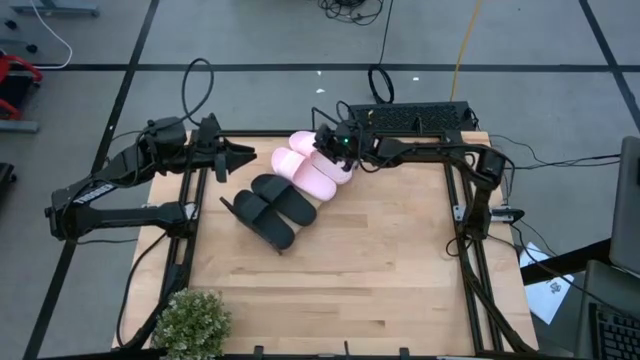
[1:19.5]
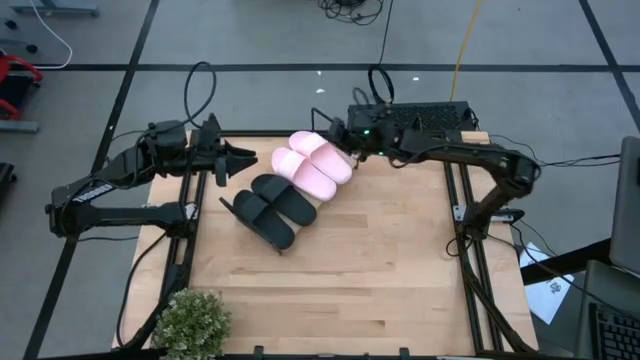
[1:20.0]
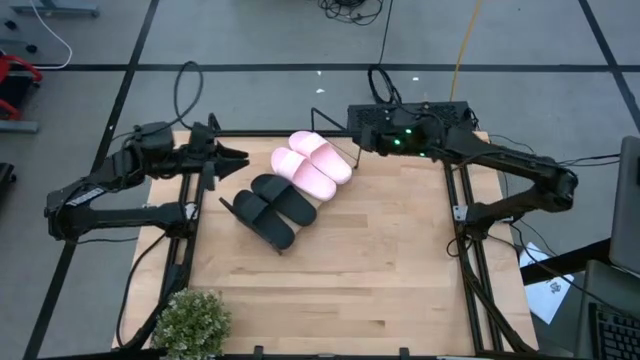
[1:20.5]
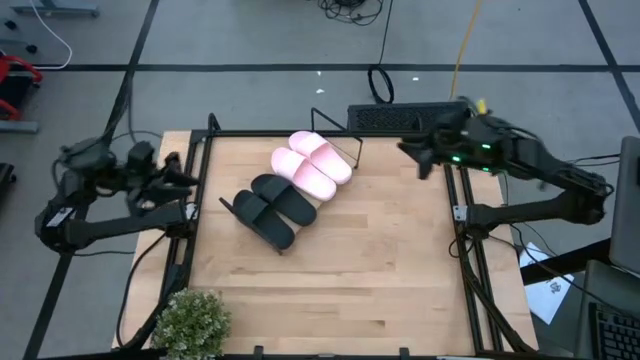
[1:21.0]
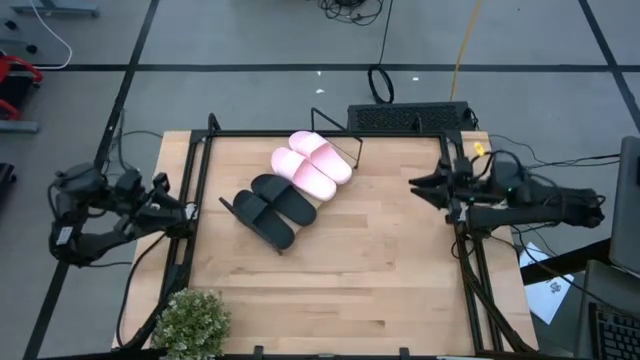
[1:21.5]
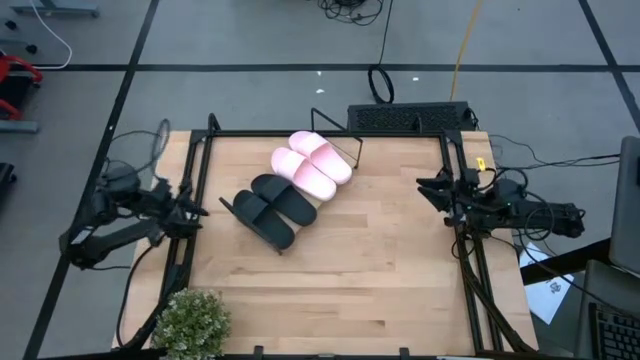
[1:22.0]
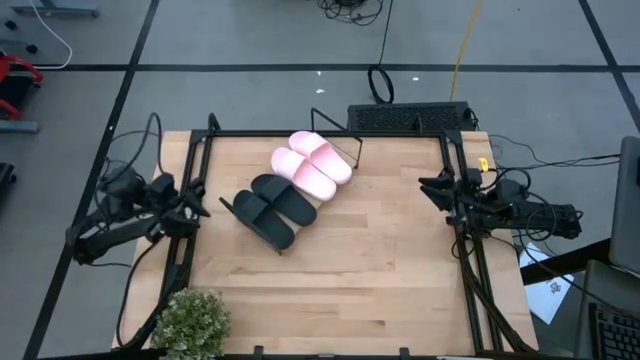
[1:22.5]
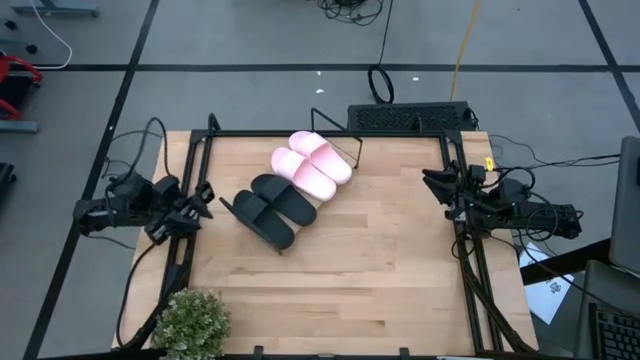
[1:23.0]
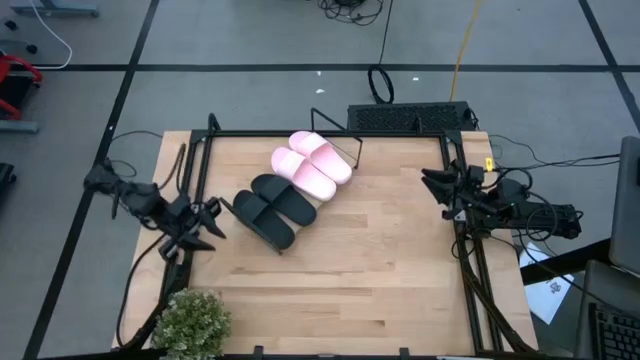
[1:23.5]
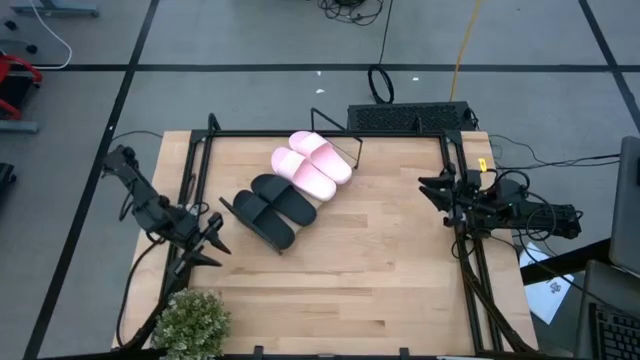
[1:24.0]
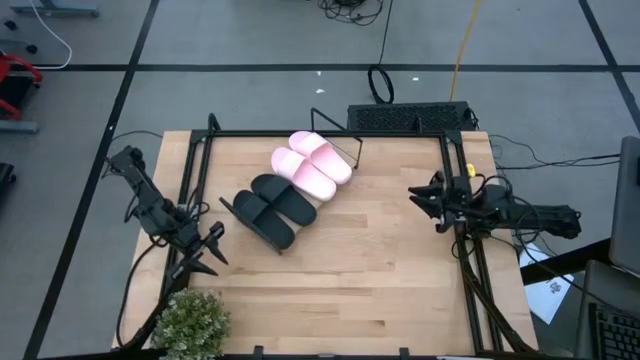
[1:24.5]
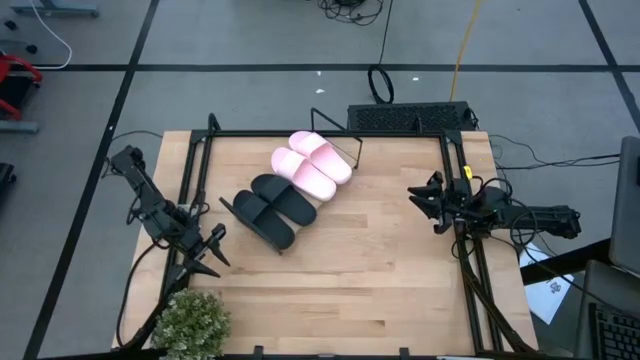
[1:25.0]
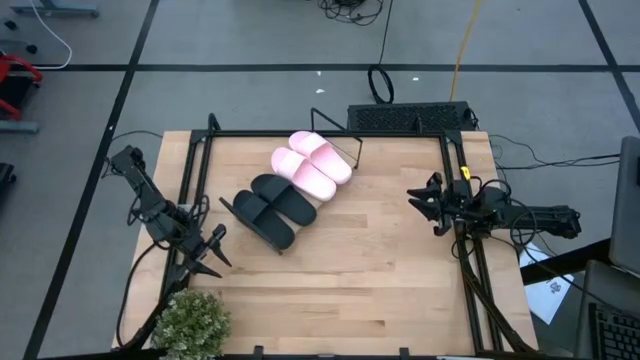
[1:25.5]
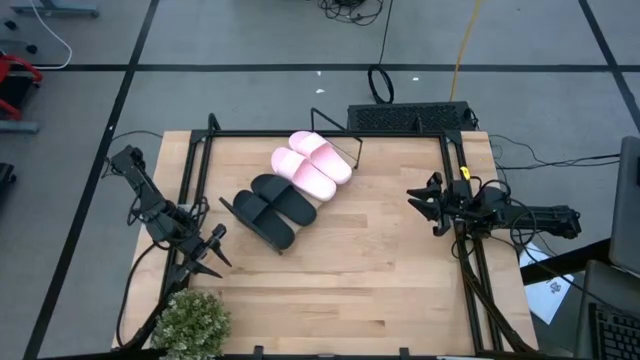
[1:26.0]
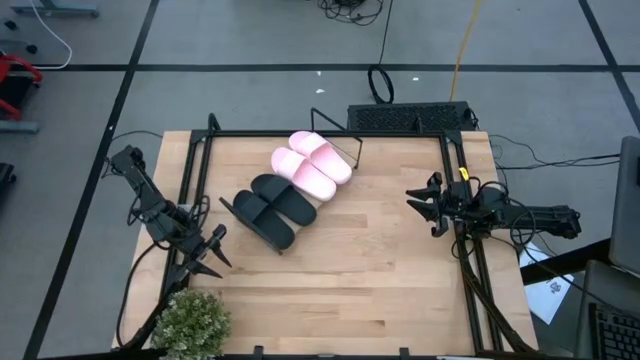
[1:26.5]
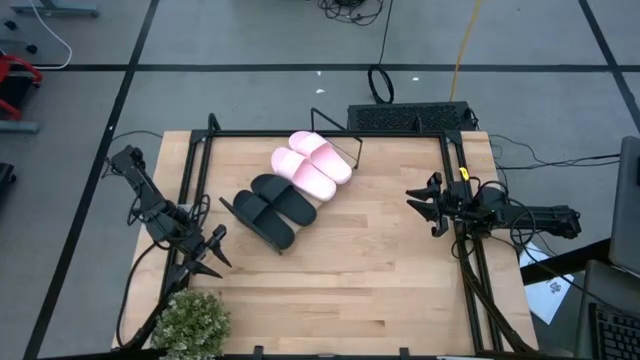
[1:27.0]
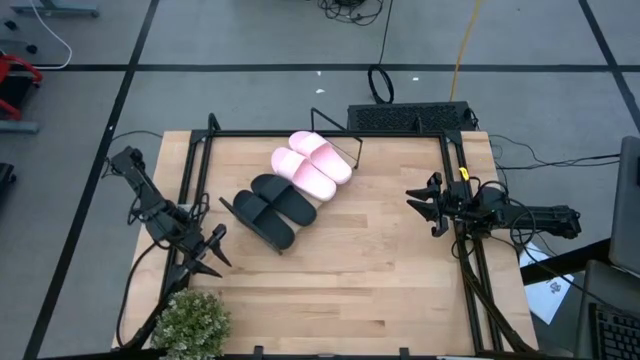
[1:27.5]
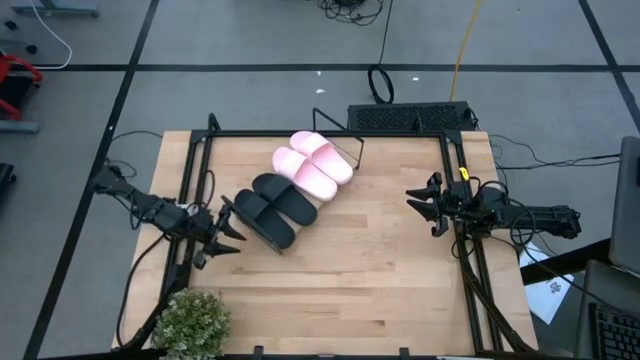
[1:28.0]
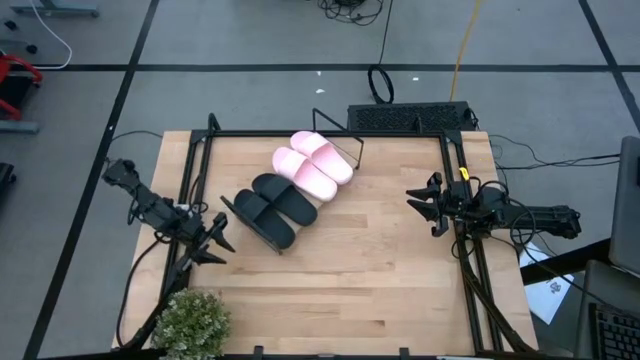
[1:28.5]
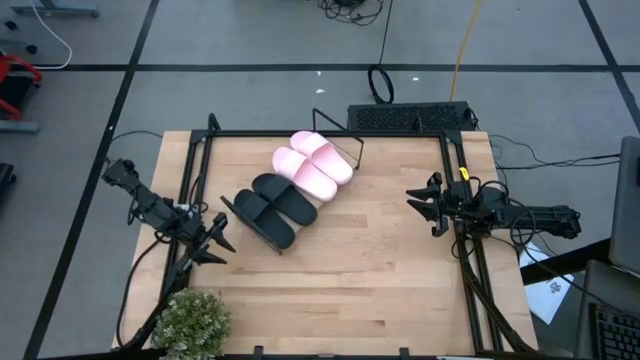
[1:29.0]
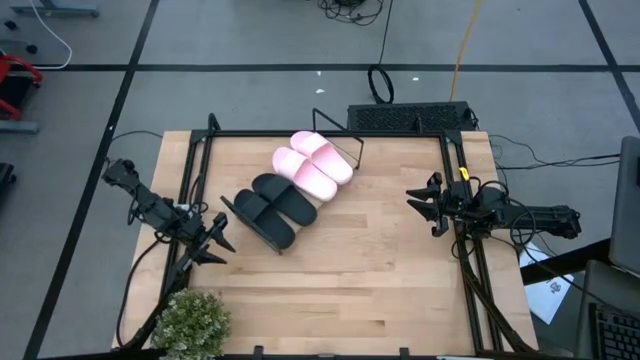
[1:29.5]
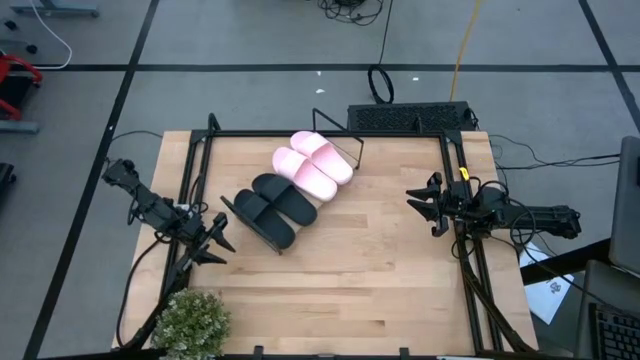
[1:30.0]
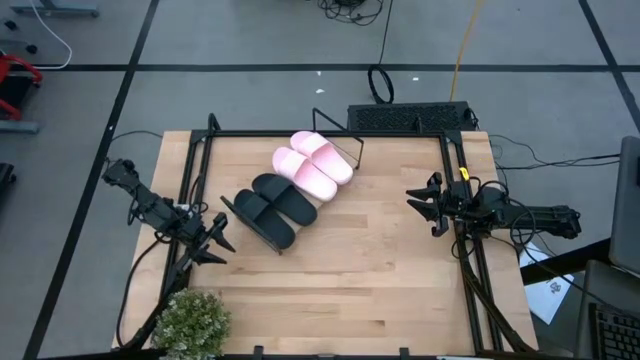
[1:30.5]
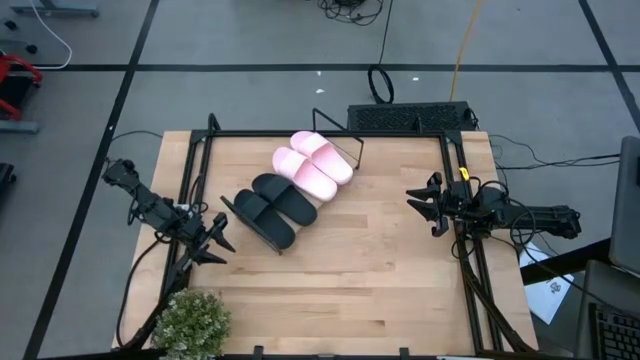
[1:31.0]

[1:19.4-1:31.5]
Task: Pick and place slides into the shelf
Return to Home Position
